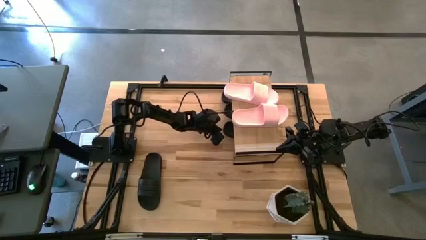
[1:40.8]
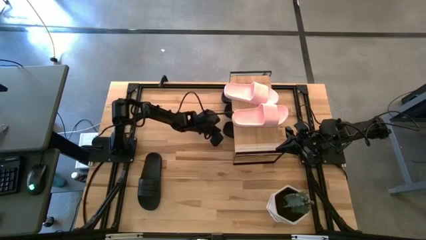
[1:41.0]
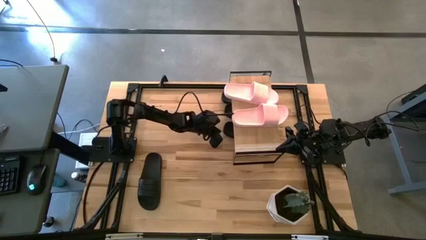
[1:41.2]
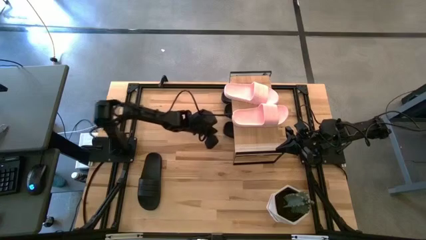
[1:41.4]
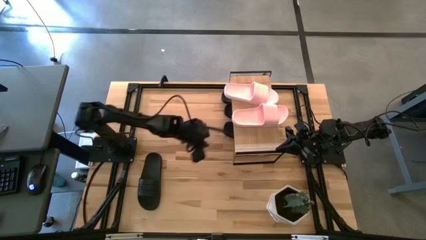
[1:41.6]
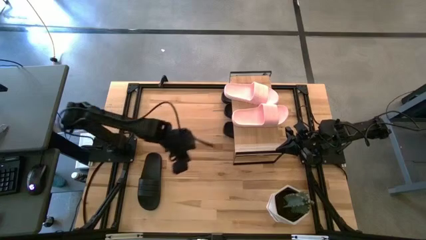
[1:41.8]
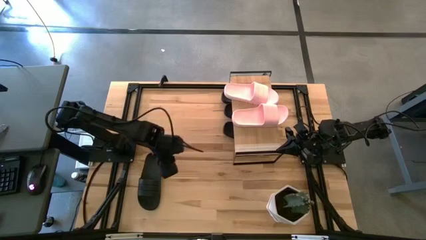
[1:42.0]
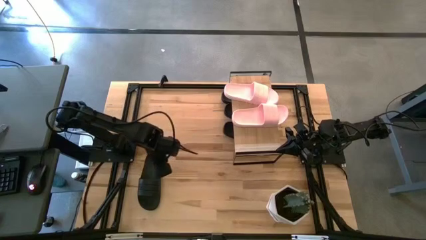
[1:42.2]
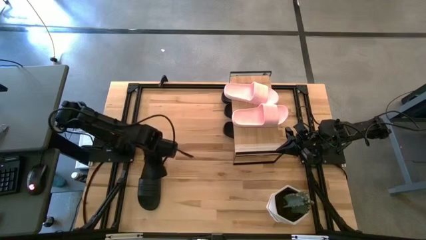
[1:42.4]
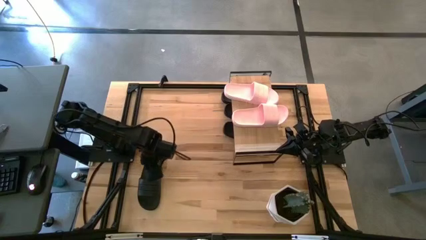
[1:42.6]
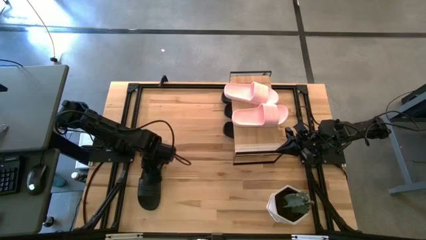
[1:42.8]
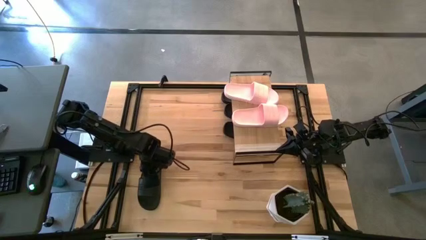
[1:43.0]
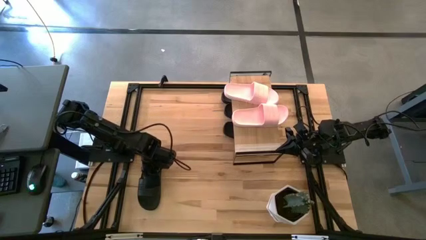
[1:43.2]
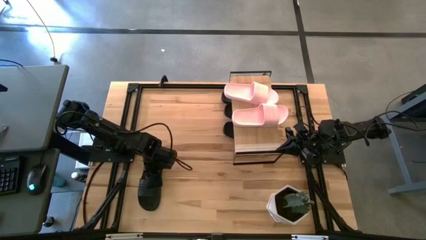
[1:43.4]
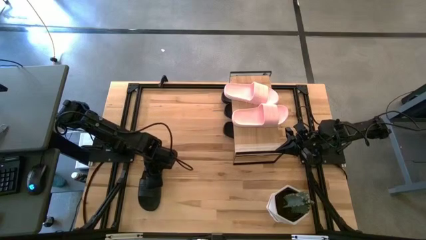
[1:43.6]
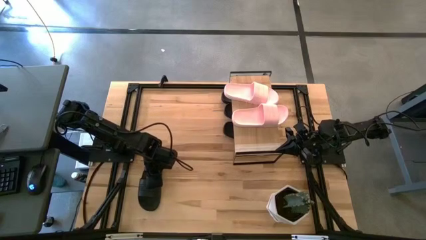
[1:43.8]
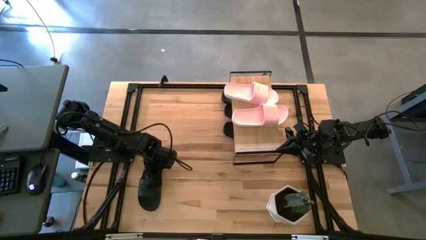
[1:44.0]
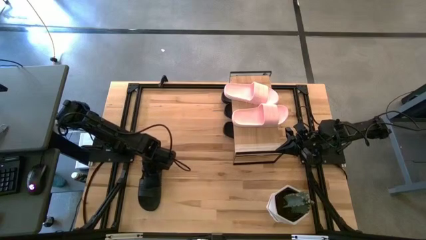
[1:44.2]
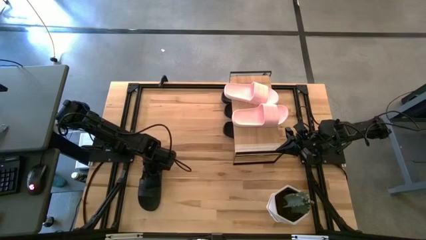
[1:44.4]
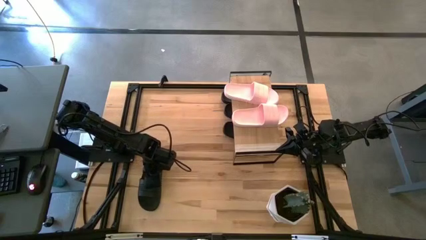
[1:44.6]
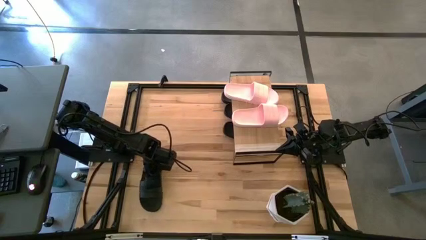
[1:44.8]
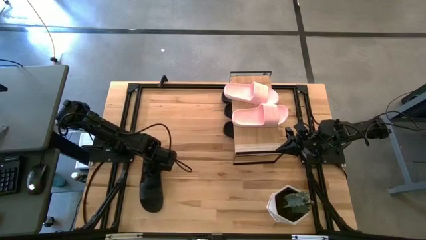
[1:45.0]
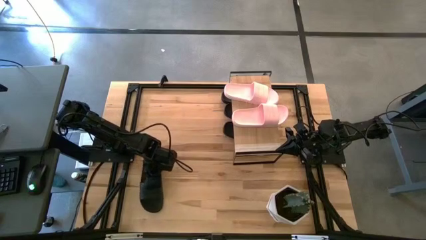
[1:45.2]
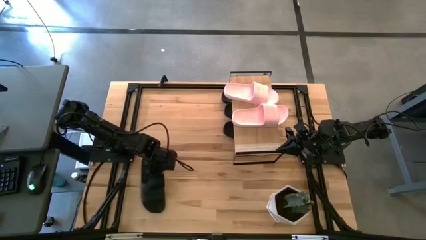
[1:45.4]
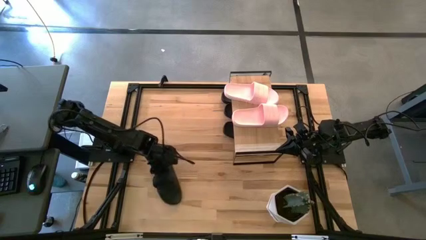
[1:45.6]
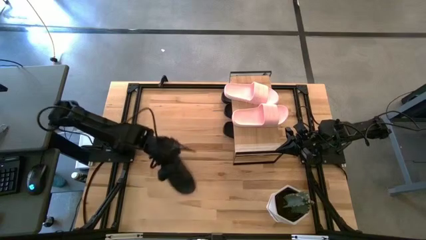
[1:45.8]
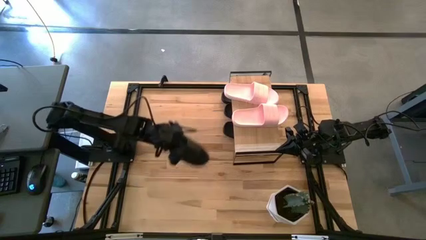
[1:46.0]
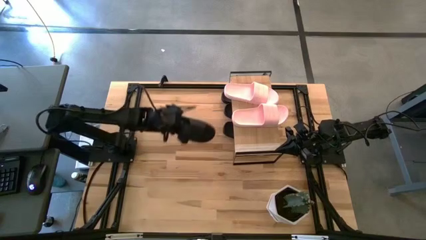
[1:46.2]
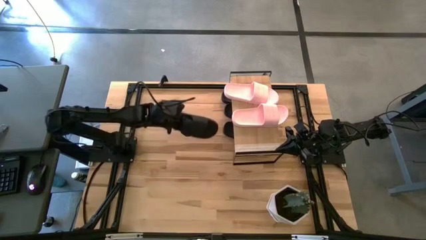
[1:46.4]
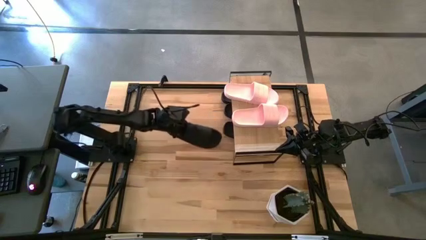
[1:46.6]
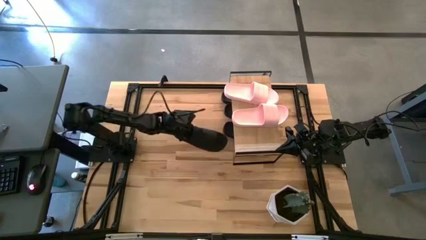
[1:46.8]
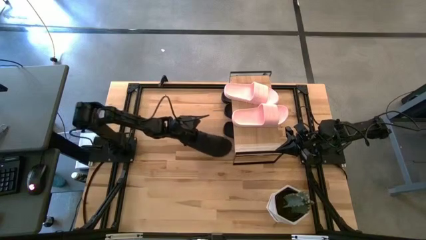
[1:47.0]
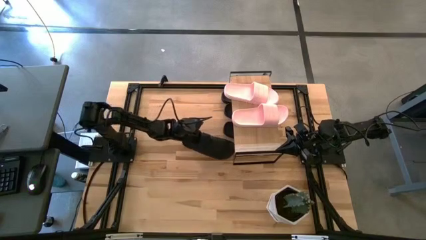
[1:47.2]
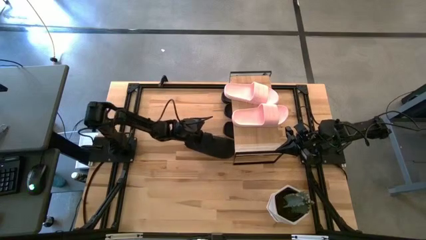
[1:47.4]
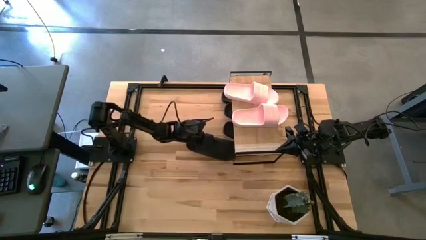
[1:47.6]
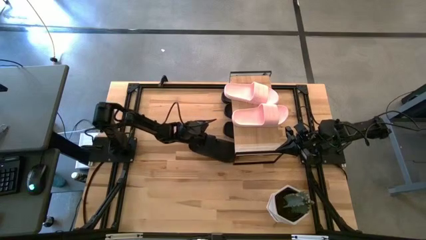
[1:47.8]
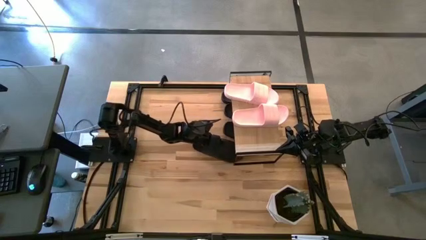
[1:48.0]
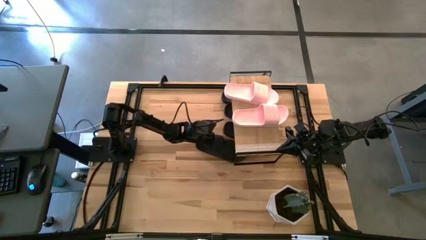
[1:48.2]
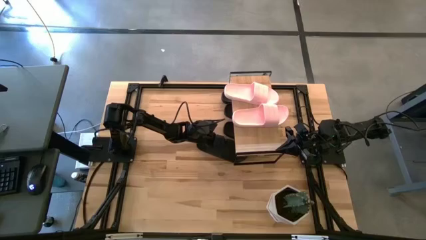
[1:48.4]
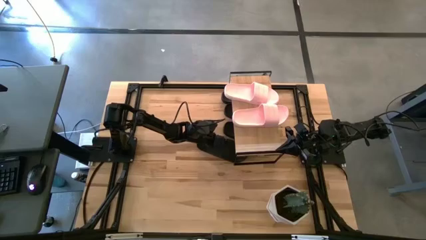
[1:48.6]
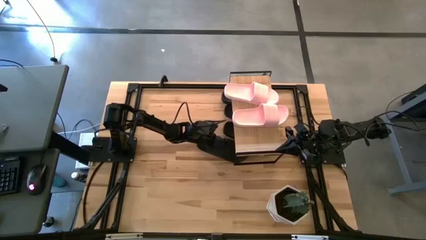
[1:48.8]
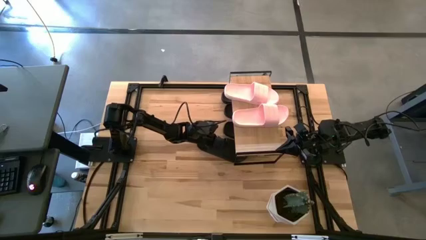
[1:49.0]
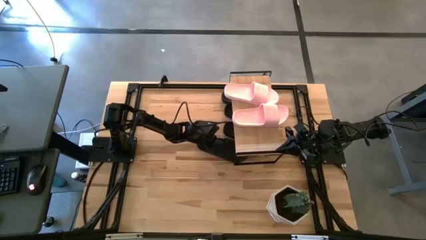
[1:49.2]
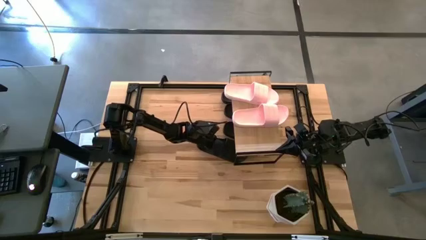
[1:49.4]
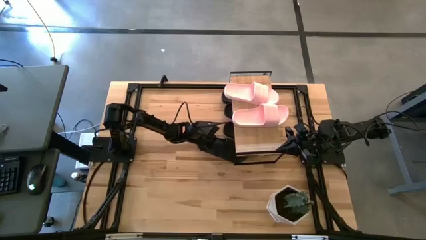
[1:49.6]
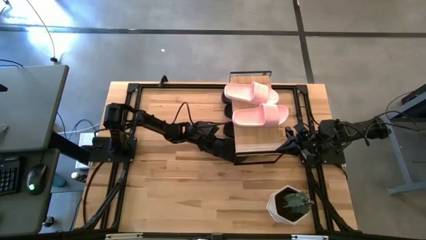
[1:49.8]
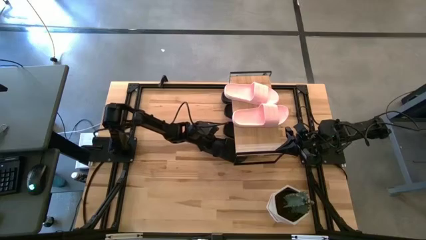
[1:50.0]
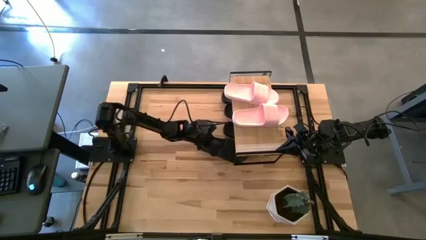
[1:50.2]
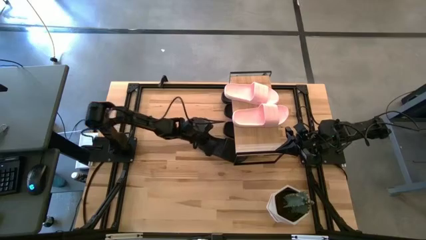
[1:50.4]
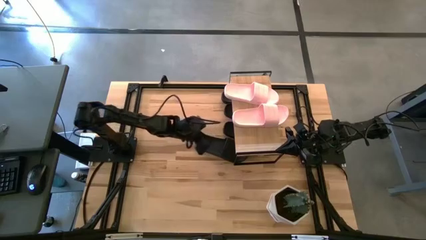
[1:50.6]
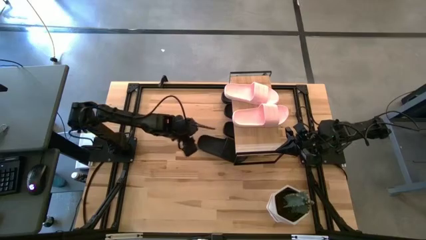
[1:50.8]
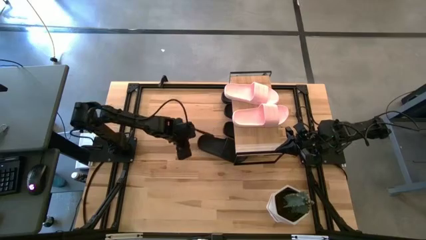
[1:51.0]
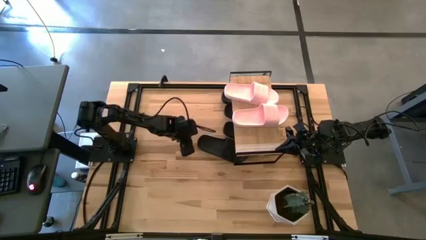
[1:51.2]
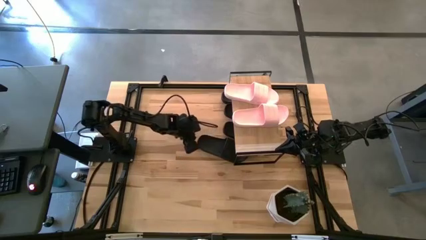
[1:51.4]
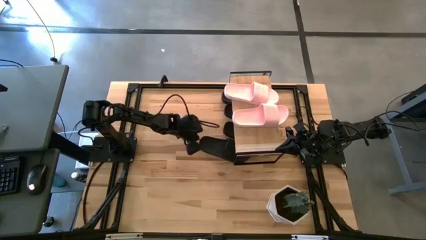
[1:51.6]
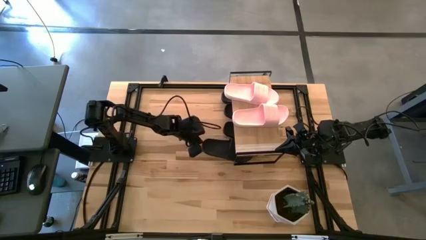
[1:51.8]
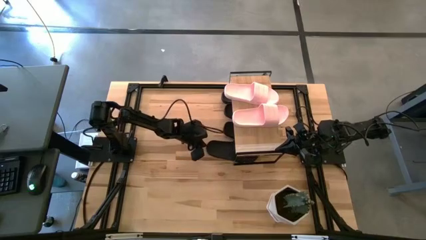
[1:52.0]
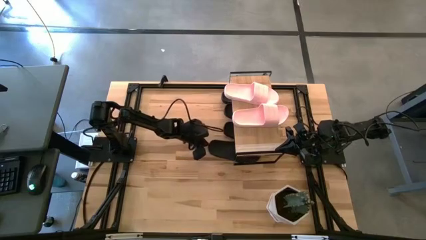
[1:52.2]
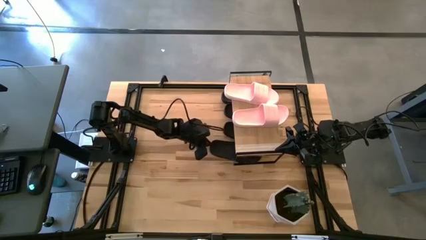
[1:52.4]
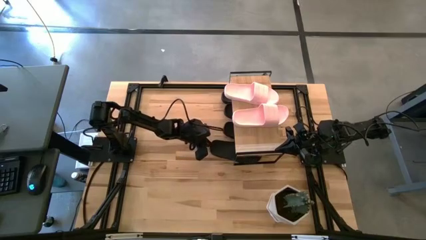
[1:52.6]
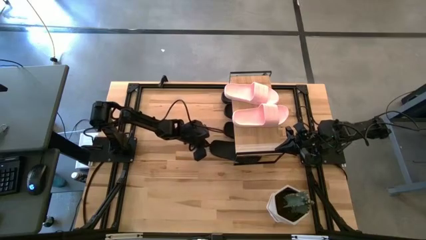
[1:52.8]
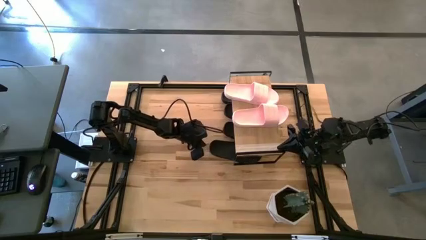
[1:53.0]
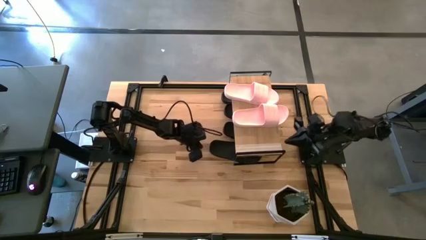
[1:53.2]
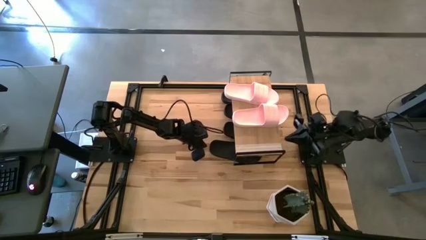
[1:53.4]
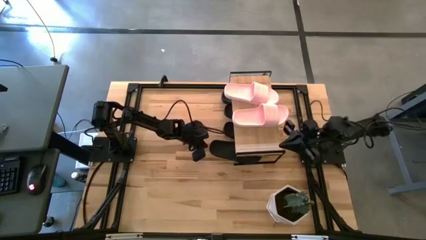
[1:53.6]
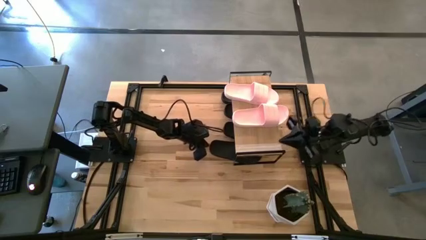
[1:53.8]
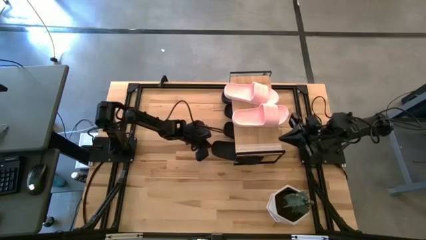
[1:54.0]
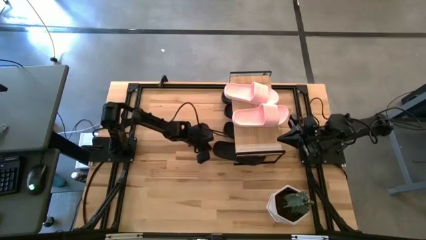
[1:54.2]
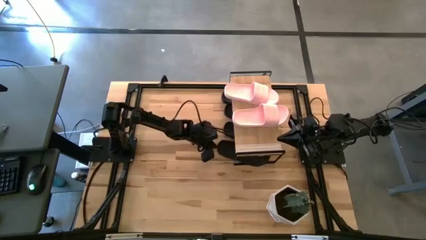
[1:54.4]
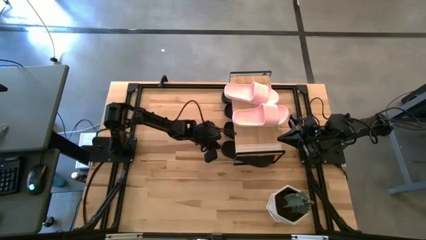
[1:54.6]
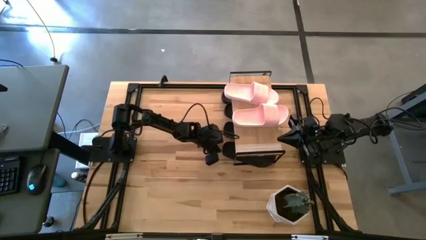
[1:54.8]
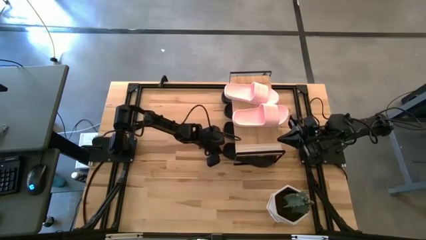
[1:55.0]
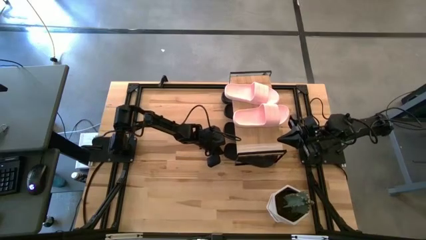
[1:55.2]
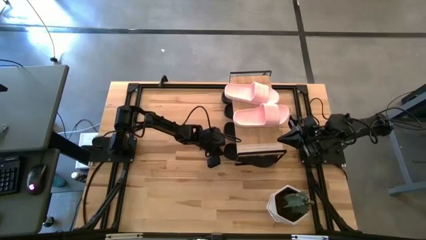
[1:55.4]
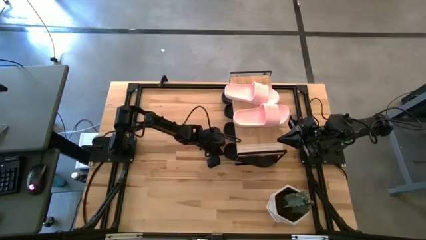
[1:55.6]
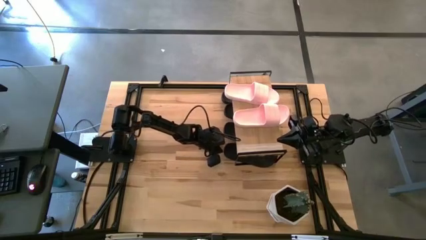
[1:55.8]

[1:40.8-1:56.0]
Task: Pick and place slides into the shelf
Put the black slide under the shelf

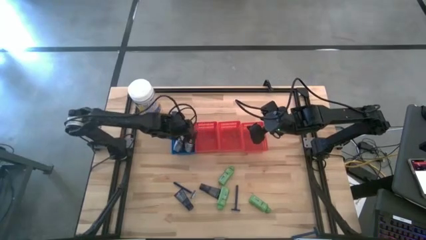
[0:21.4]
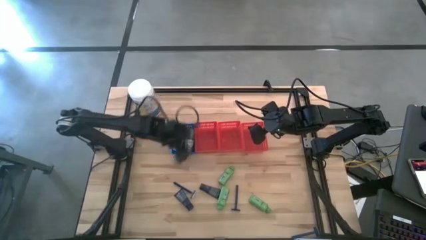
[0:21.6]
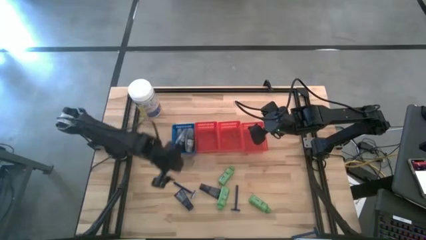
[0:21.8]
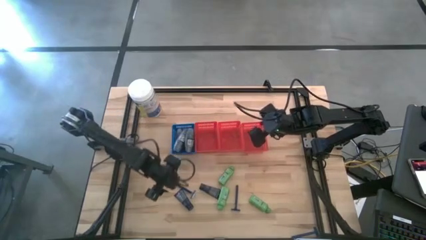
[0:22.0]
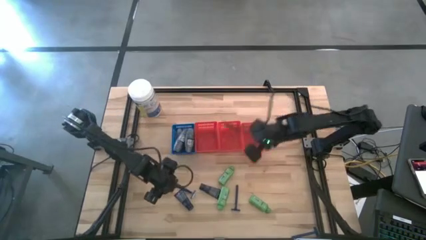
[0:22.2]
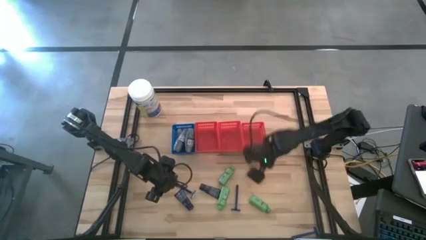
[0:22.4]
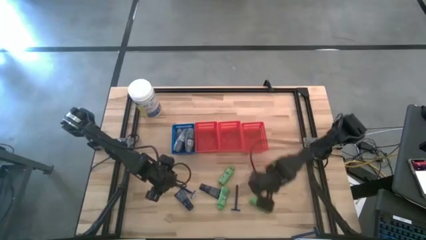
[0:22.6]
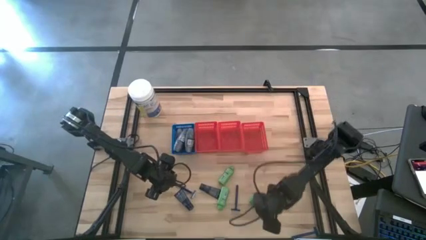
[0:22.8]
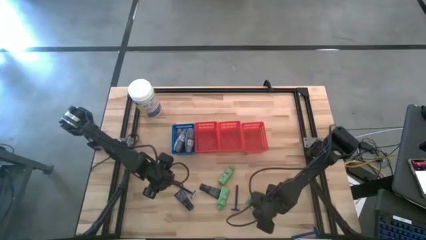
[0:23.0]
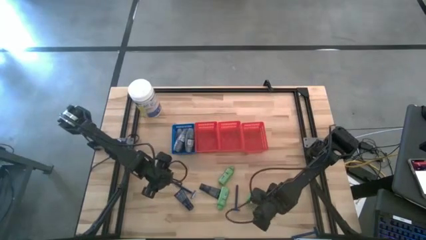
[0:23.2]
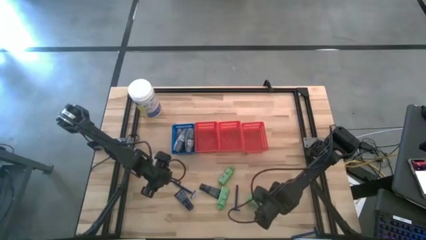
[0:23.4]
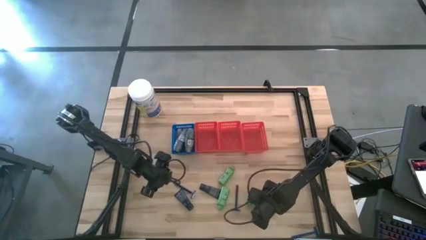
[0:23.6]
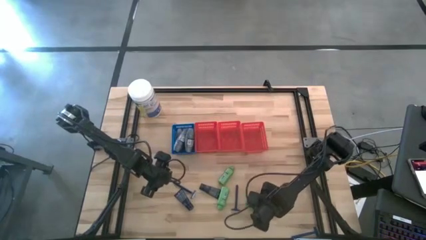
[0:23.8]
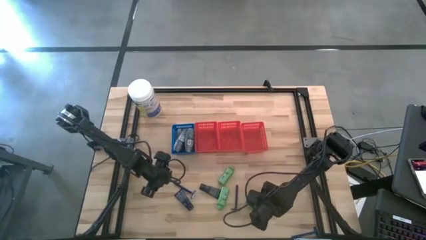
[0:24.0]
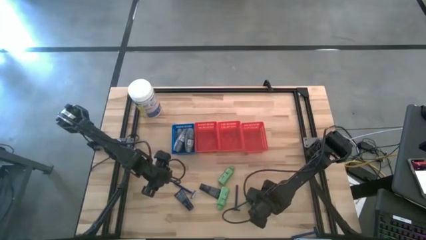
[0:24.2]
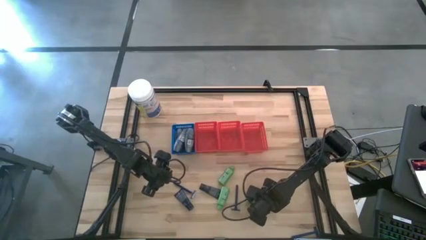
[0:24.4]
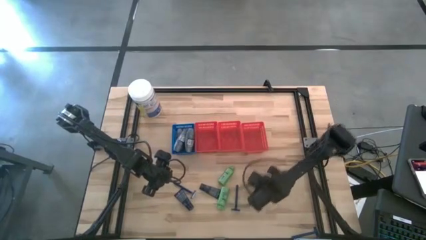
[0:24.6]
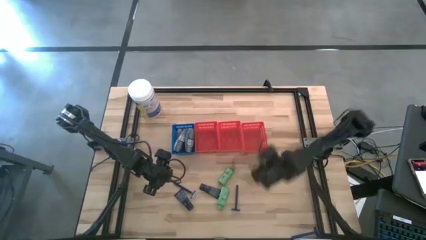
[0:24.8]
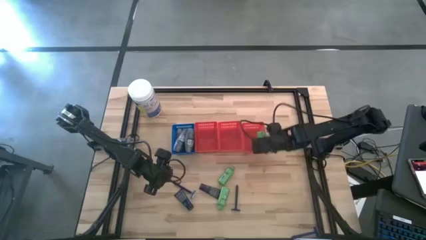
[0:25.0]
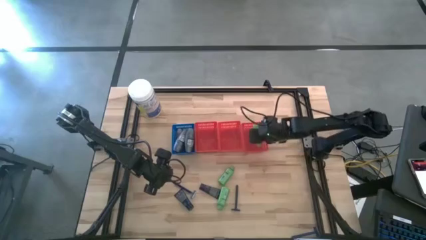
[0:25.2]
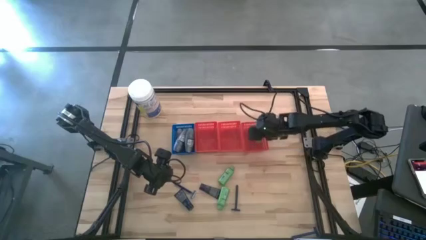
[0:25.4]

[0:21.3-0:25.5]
Task: Pick & Place Travel size toiletries
Put the shampoo into the right red bin
